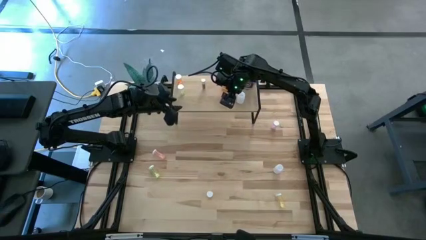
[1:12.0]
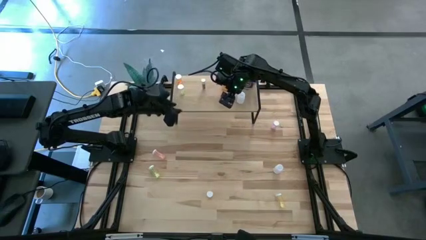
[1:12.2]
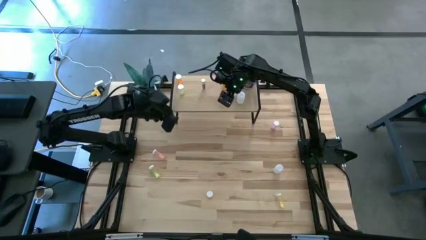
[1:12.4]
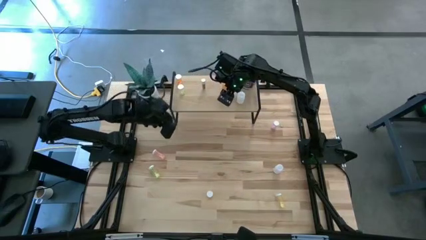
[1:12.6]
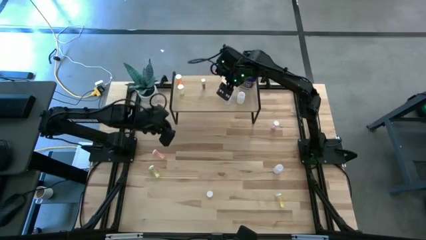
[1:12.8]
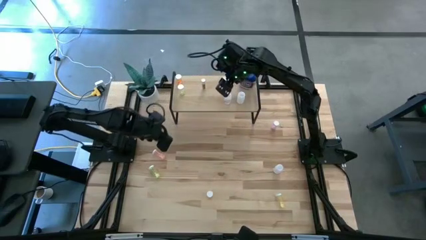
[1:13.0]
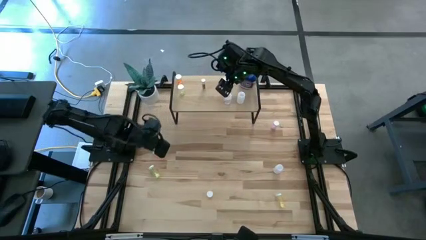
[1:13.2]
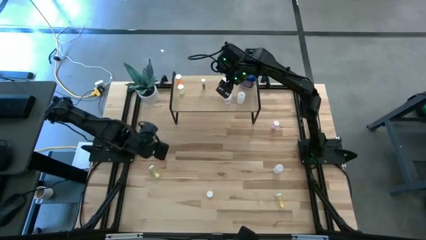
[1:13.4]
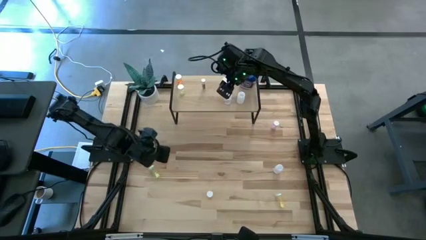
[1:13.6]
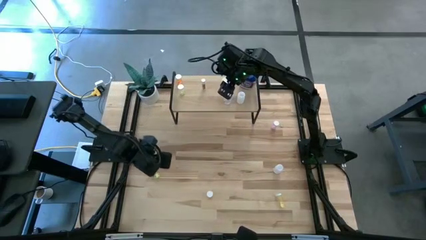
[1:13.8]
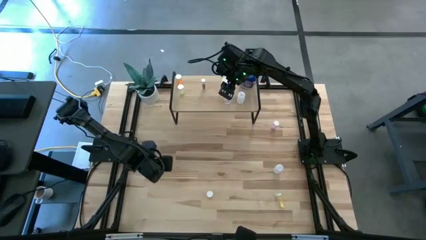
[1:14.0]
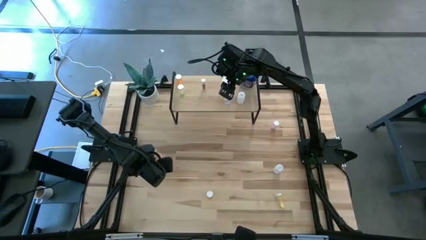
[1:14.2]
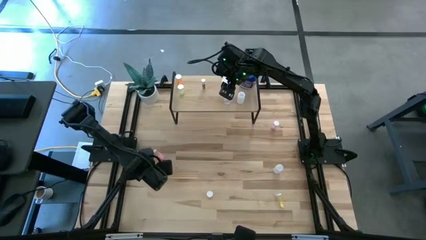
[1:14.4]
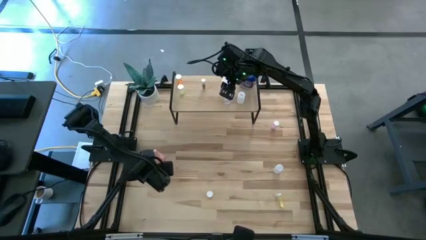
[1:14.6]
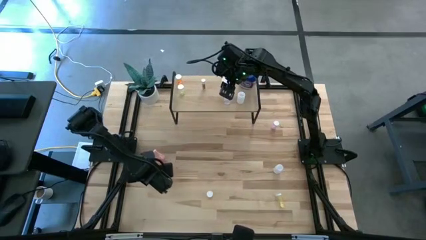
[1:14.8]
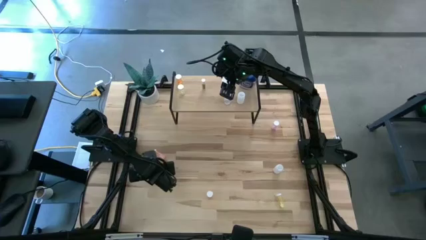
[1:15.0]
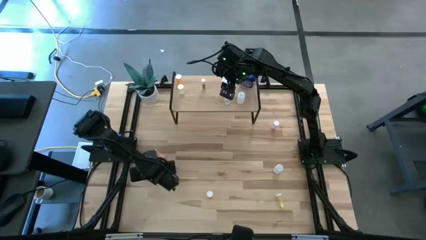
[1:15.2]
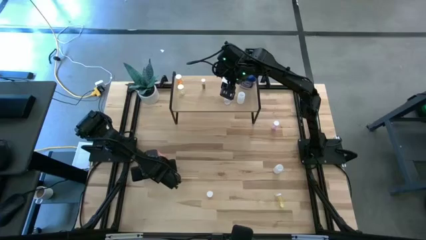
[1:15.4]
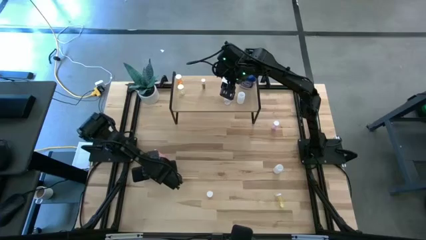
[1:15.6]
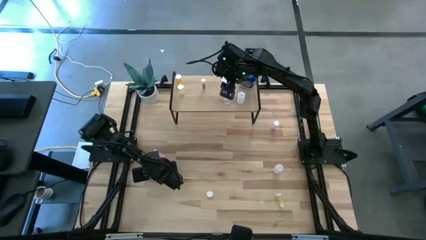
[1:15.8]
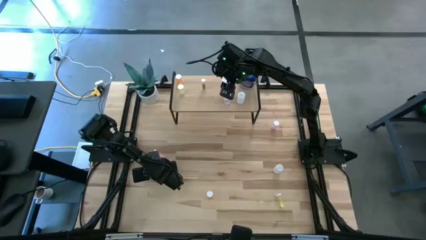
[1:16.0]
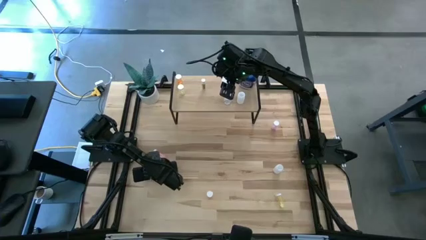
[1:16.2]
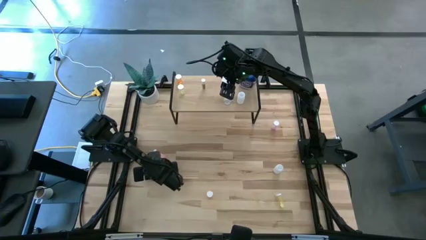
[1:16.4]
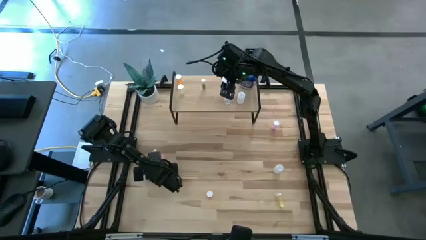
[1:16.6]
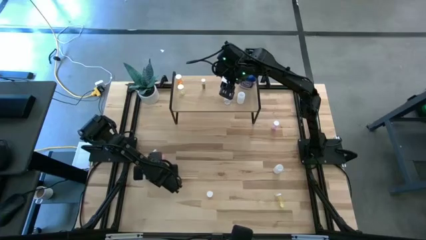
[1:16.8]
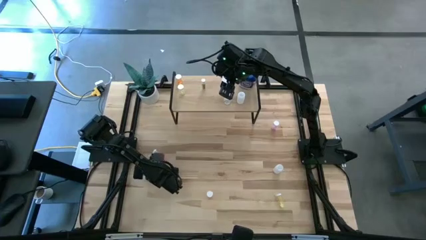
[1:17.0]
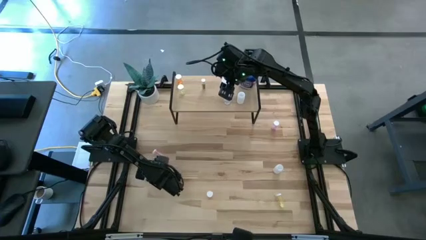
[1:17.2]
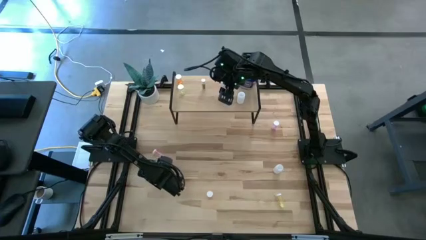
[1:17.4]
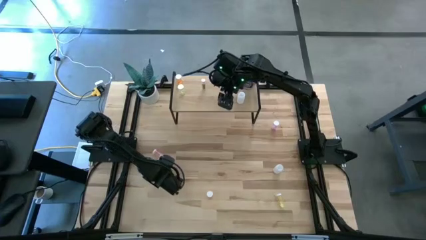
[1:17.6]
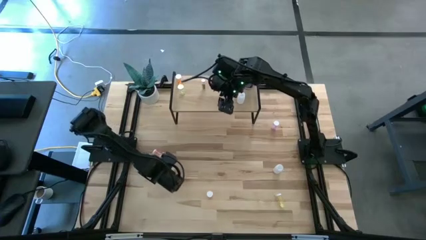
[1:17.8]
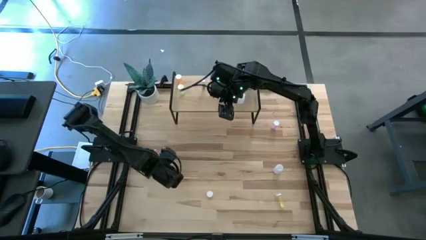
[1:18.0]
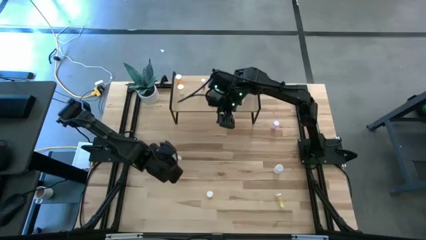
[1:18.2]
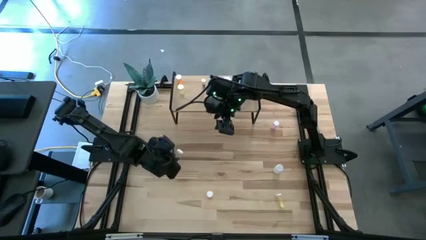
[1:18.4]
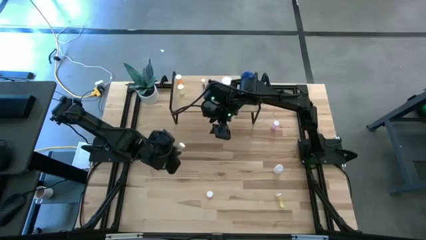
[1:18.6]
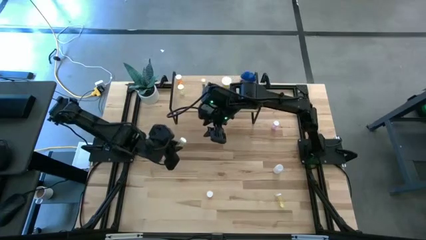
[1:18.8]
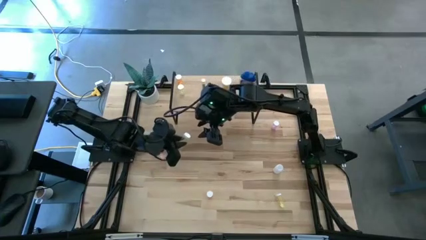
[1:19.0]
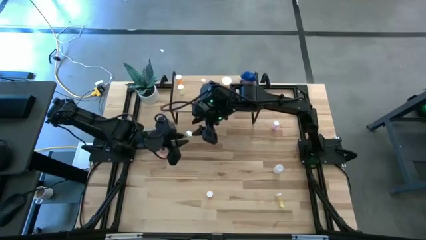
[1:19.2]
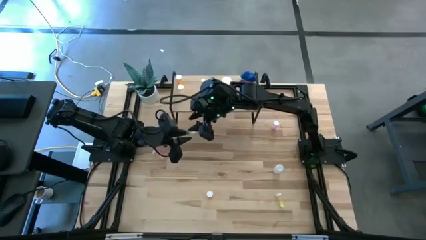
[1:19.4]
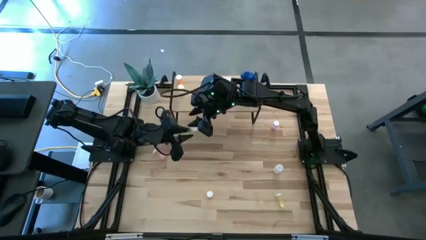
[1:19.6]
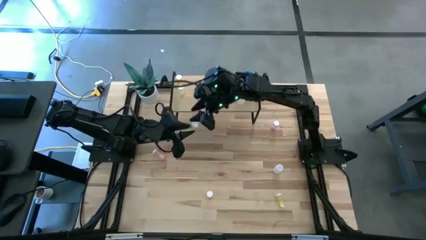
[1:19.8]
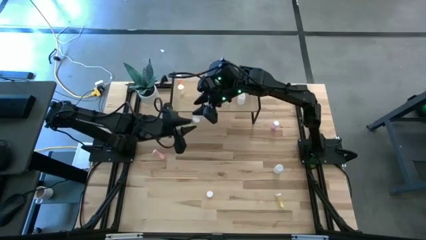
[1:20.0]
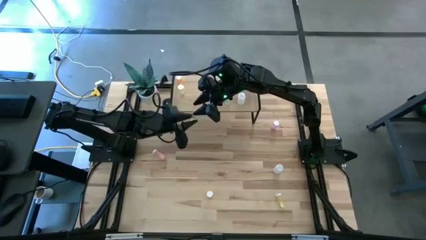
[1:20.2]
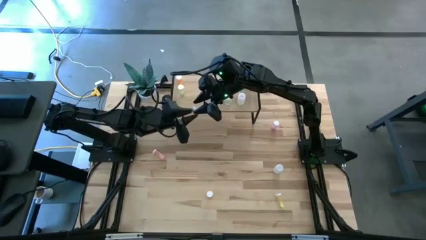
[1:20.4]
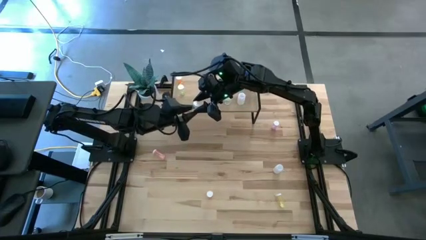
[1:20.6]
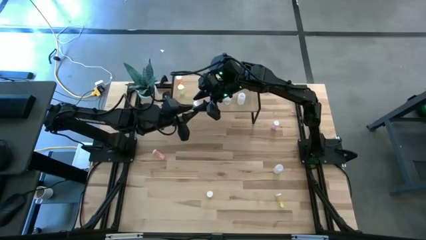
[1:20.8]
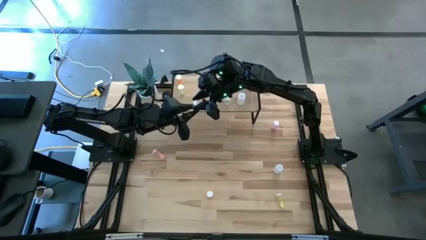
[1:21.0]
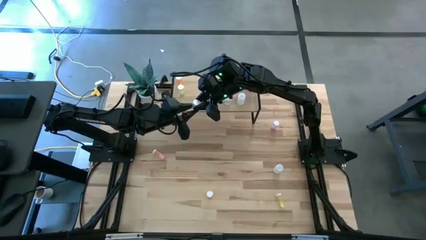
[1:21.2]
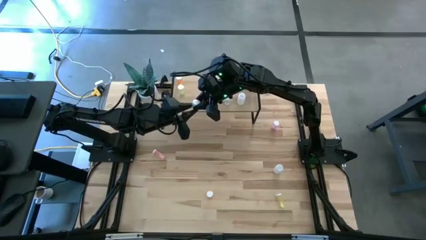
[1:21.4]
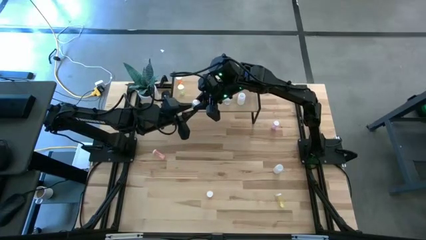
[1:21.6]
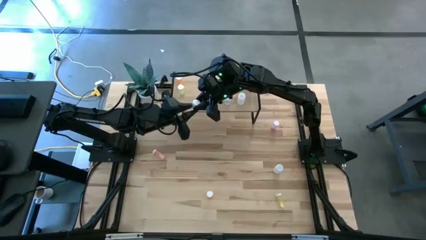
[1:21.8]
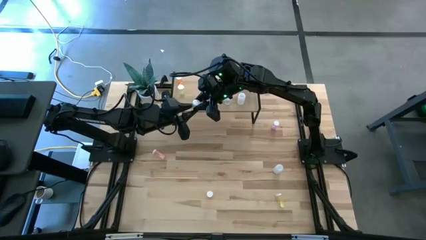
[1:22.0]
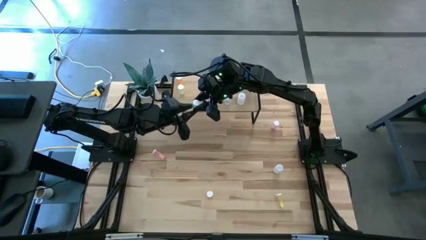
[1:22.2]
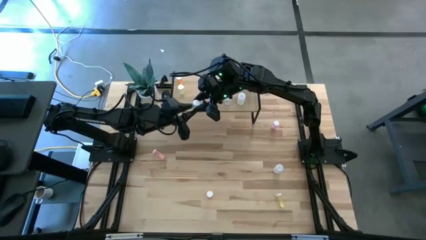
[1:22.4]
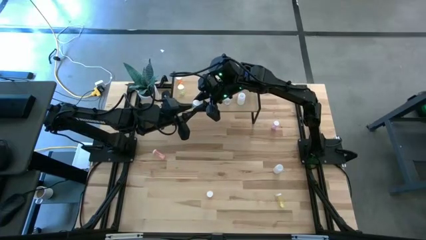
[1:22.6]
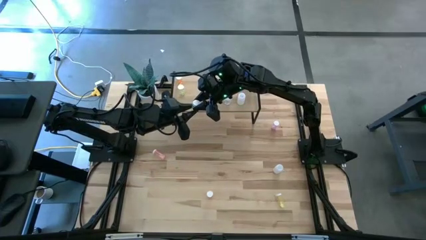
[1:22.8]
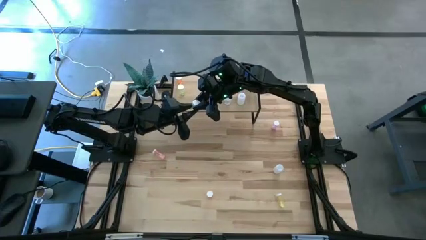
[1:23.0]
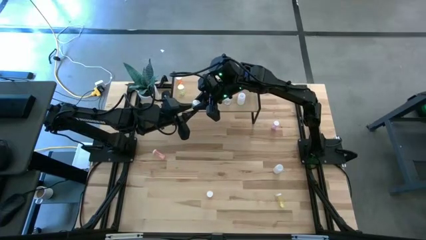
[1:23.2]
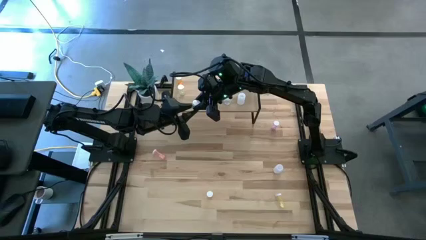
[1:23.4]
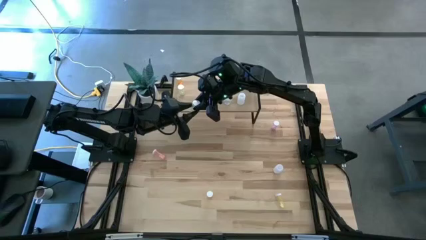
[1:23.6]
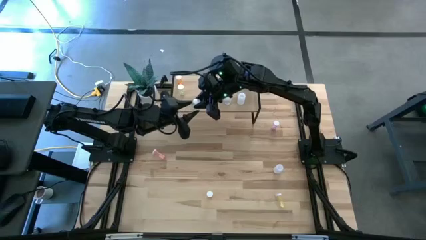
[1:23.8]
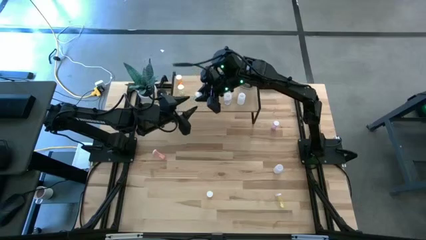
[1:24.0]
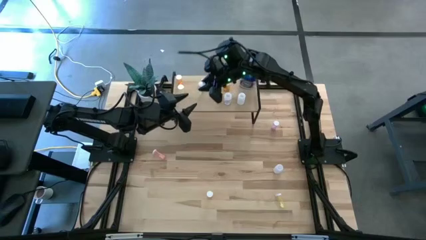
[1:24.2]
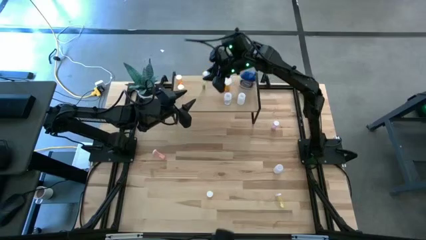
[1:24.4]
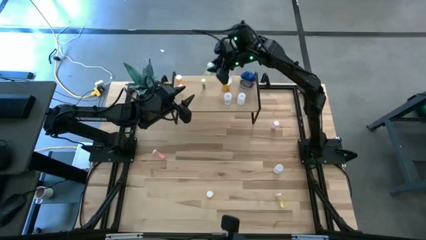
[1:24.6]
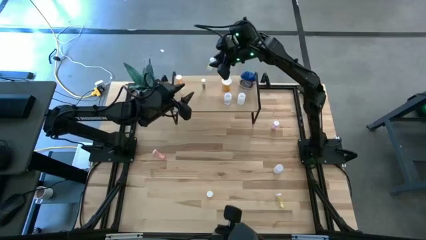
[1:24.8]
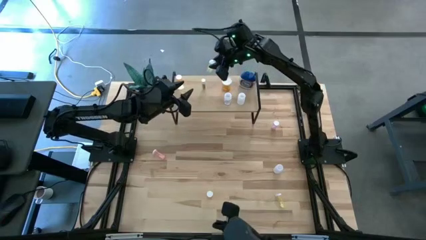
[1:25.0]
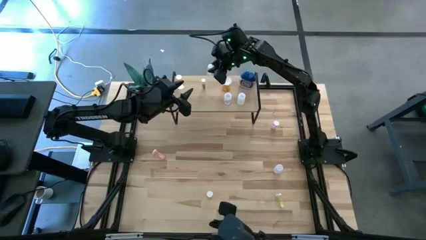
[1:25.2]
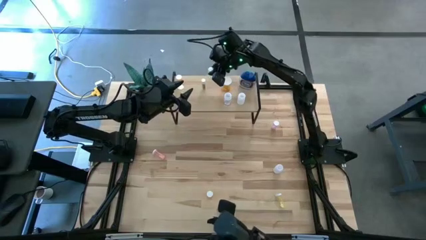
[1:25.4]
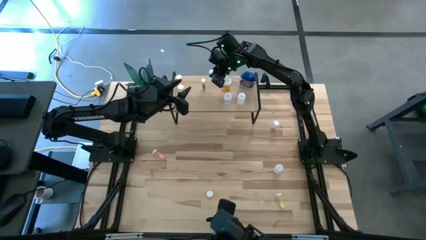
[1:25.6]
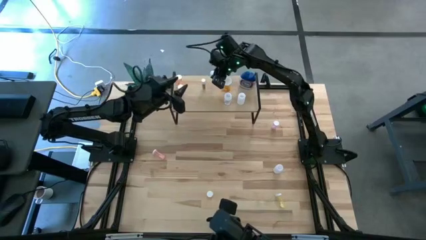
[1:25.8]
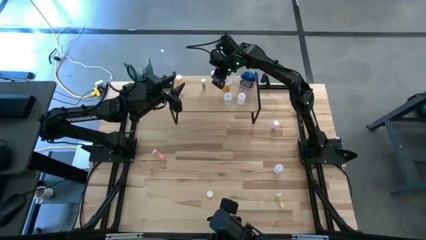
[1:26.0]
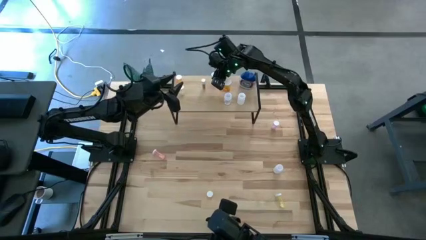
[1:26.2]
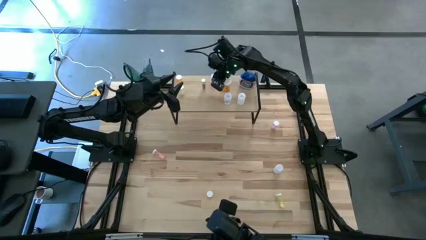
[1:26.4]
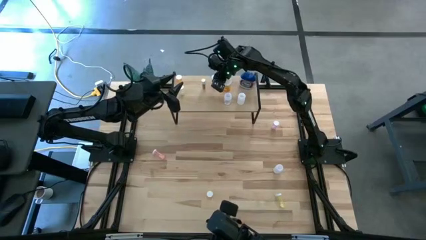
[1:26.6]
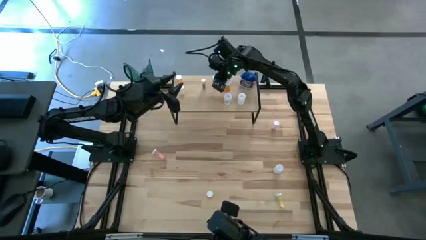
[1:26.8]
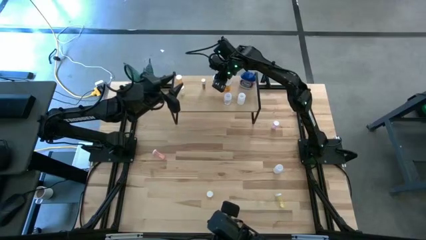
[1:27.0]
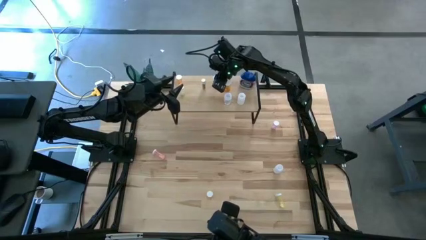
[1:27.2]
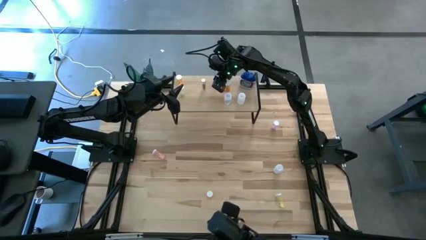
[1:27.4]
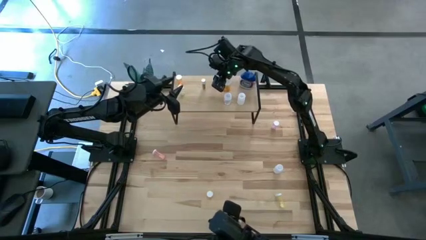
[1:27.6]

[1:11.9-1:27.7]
Task: Pick and place medicine bottles onto shelf by color
Put the top yellow pill bottle on the shelf

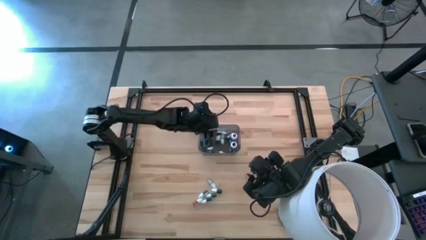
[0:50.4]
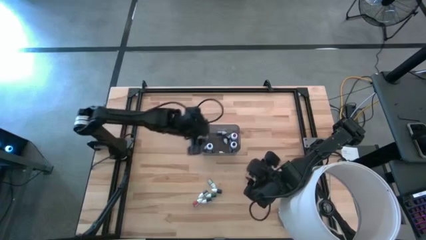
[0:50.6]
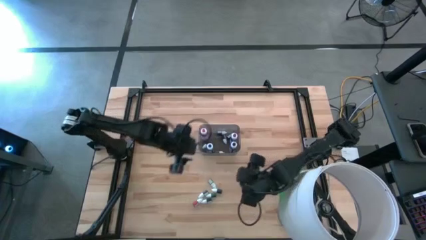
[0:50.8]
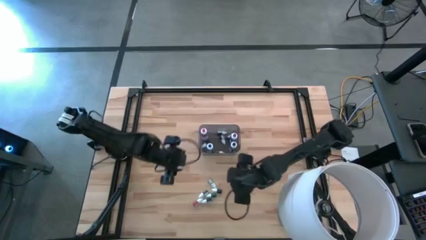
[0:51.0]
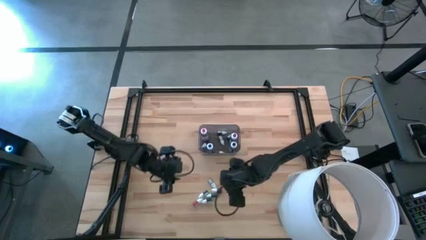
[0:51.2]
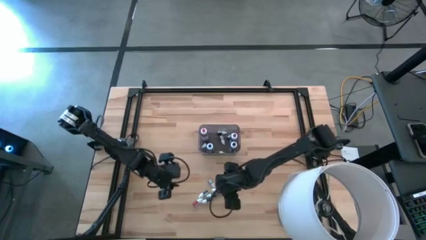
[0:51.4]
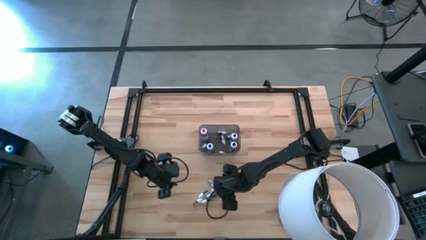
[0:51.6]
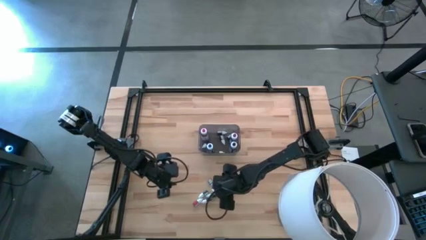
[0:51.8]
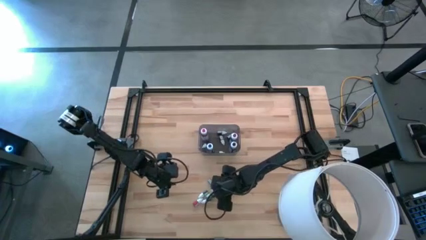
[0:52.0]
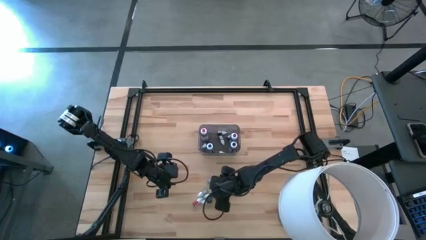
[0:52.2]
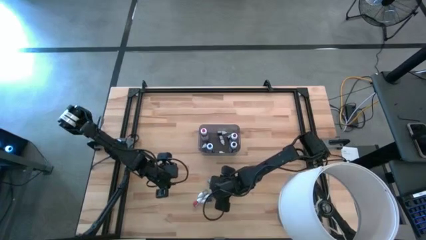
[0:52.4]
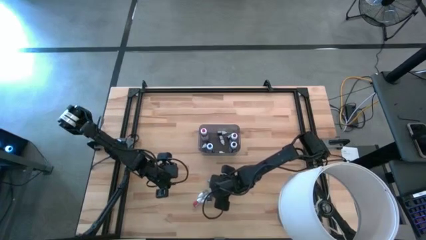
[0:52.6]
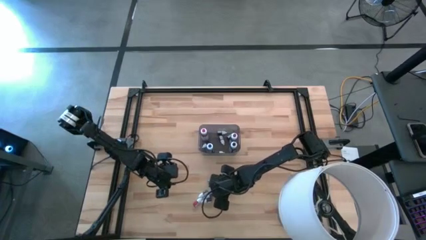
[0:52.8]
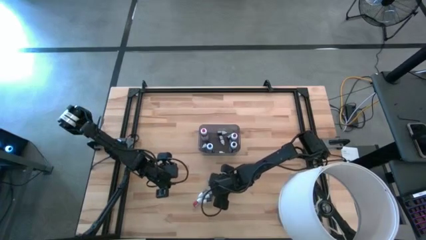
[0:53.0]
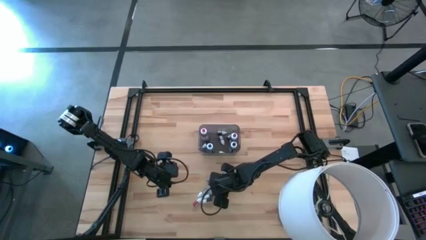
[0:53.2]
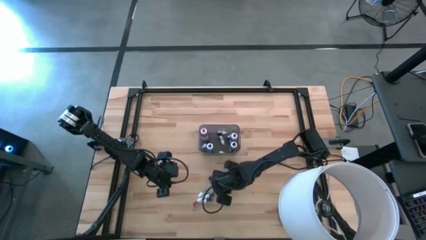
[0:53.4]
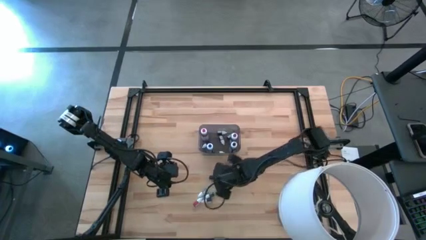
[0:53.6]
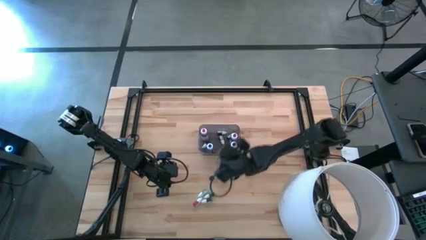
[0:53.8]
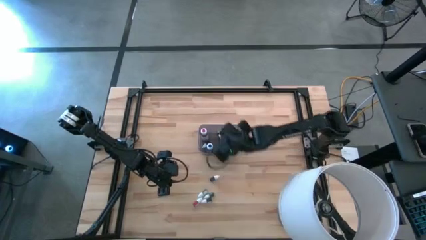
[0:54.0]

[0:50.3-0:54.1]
Task: Pick & Place food coloring
Put the small violet food coloring bottle in the black bin
